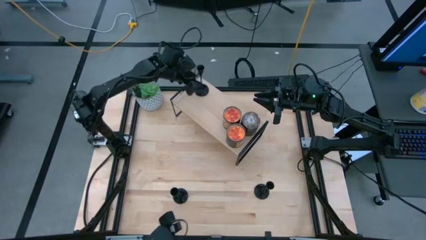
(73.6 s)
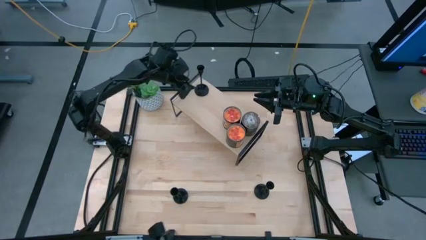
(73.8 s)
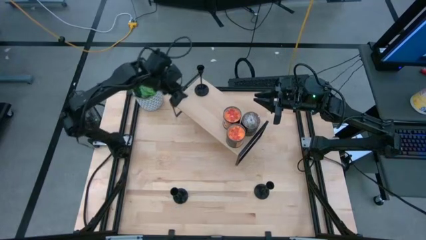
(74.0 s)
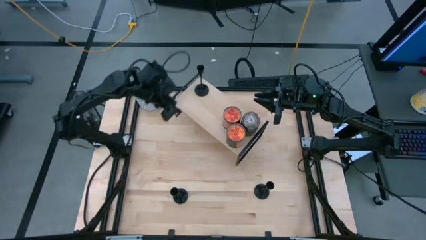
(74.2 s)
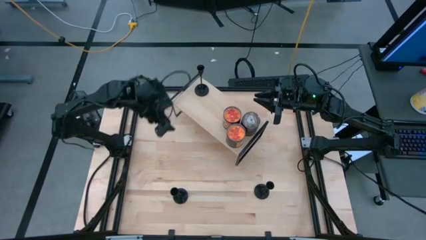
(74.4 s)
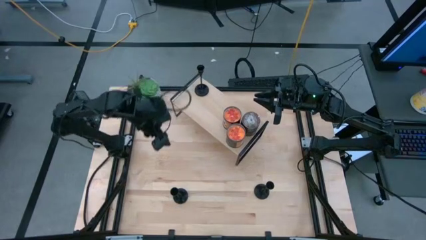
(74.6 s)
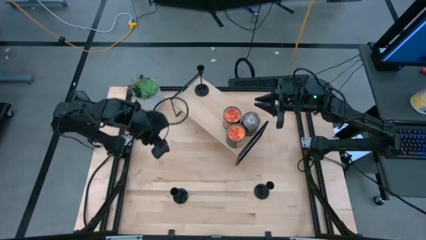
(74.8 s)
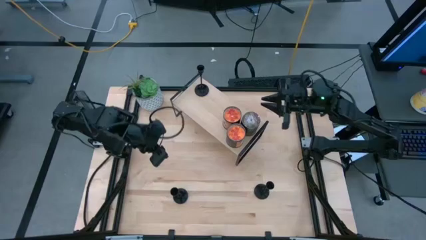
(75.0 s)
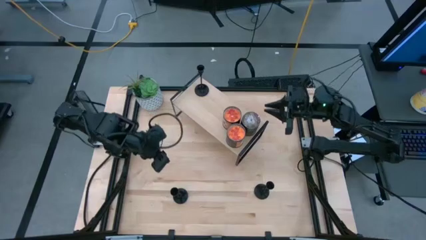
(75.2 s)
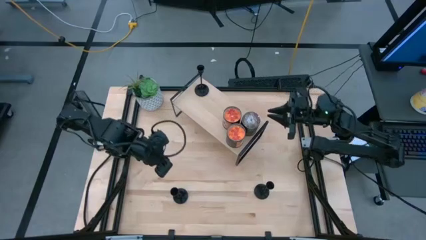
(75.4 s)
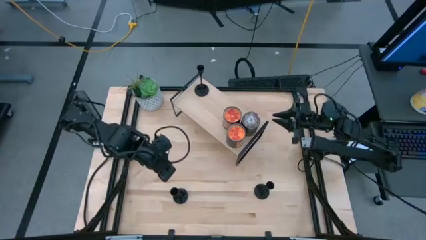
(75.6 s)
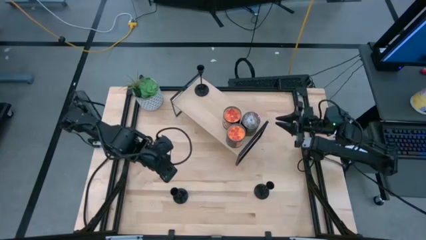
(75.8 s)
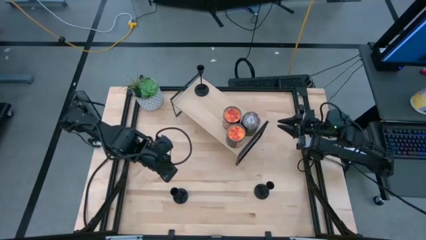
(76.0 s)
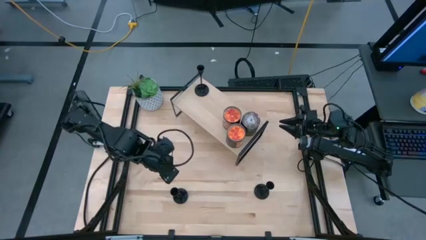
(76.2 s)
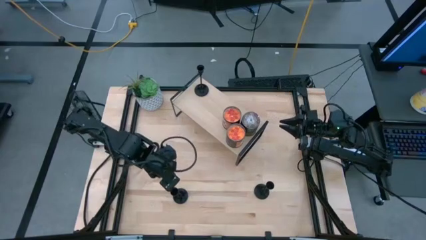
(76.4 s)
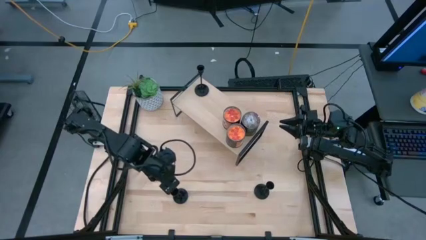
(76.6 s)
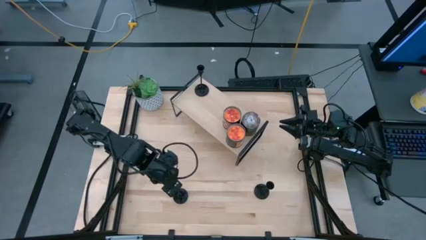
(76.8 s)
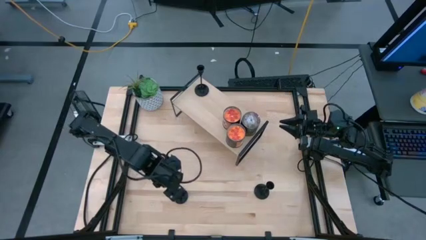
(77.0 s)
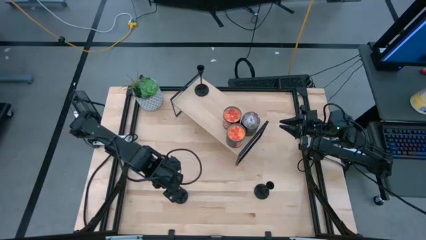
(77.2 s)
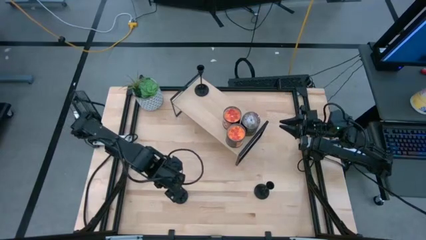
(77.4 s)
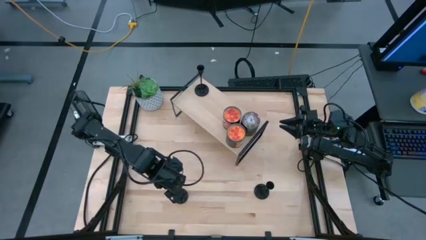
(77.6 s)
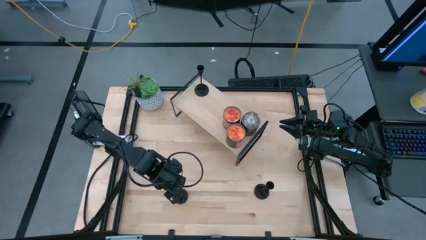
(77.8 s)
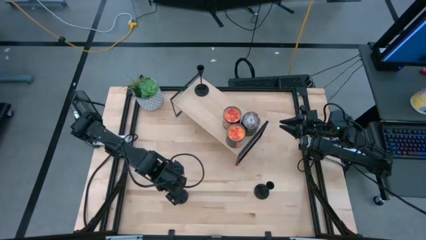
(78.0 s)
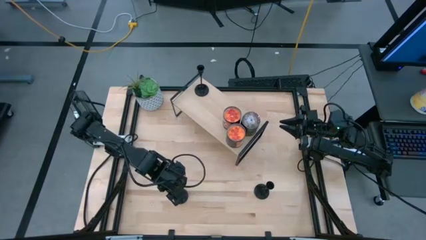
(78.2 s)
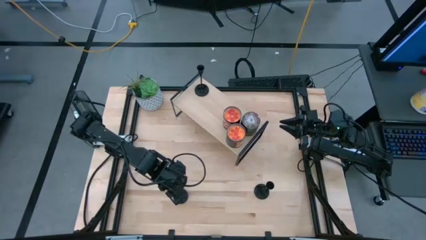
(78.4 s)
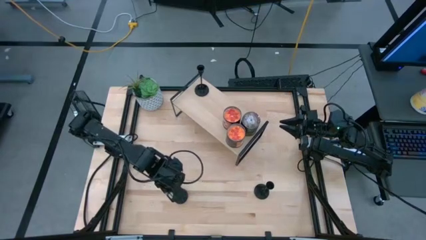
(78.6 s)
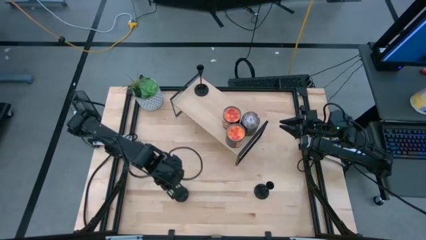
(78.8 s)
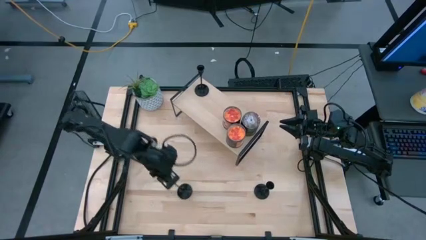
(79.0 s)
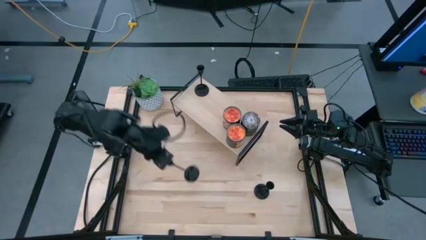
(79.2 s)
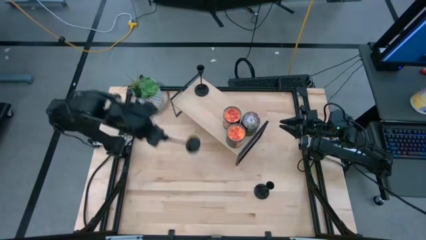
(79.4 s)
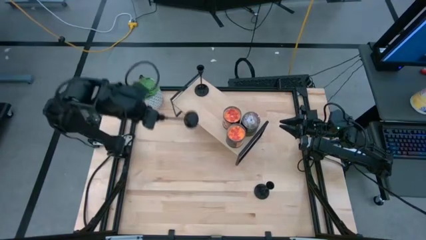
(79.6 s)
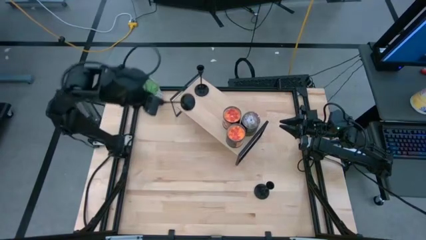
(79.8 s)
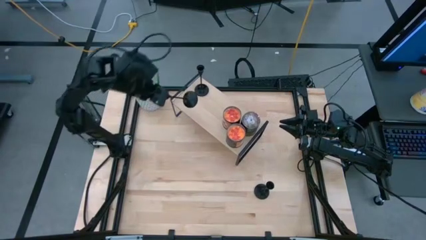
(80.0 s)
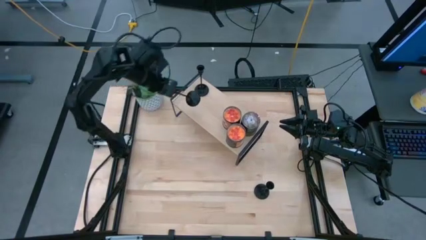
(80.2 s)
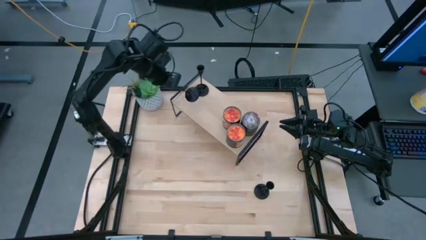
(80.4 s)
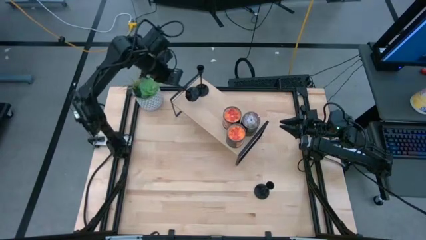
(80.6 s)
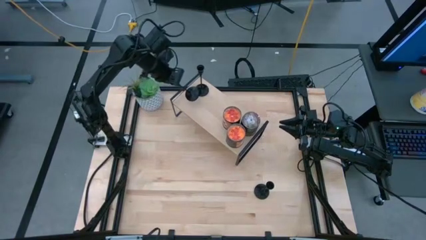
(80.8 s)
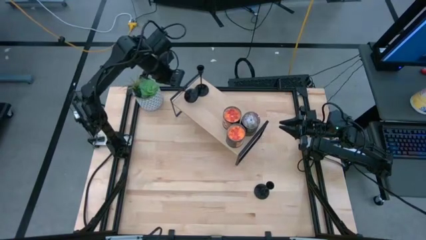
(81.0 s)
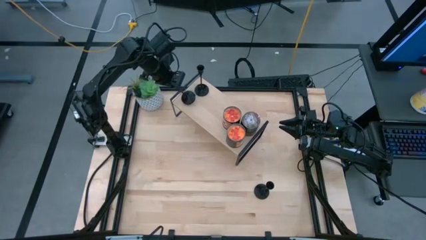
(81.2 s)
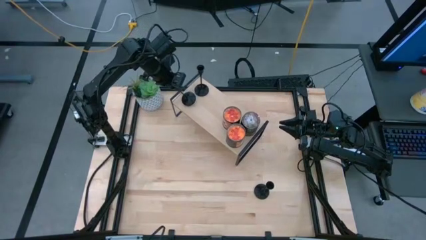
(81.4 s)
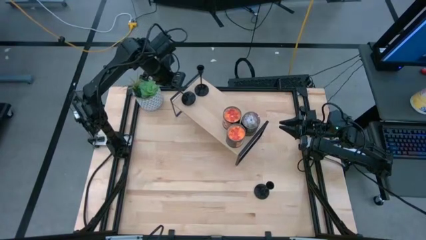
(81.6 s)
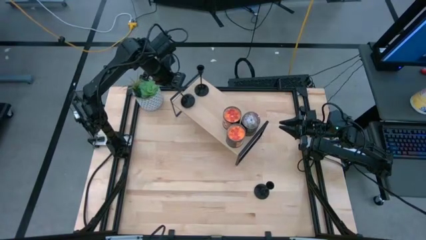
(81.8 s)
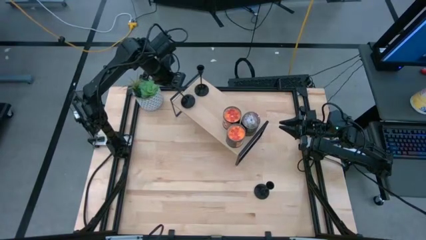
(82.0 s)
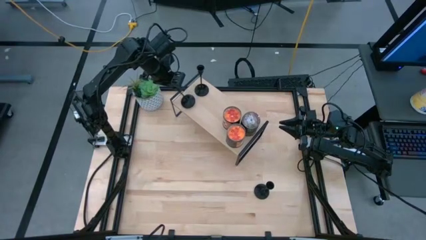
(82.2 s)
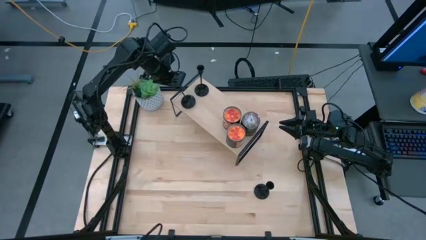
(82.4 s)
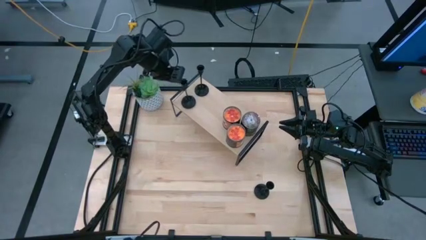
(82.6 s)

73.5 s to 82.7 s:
Task: Pick & Place candle stick holders
Put the left black candle holder on the shelf

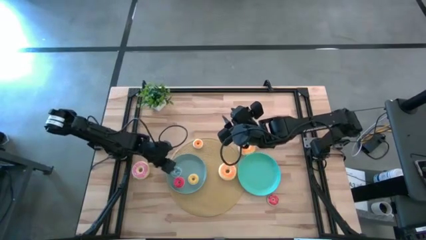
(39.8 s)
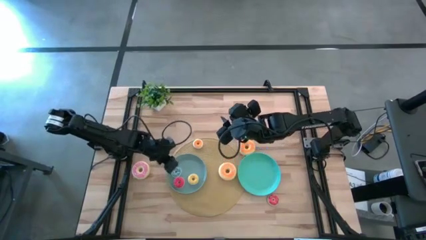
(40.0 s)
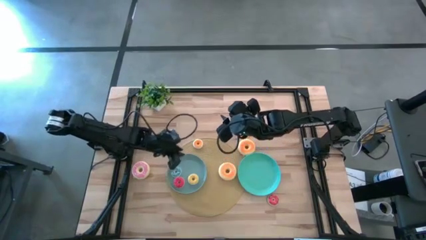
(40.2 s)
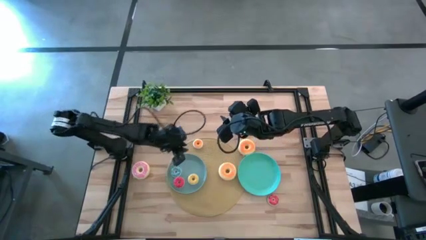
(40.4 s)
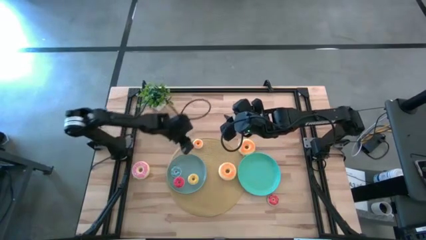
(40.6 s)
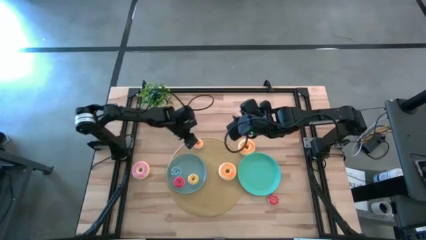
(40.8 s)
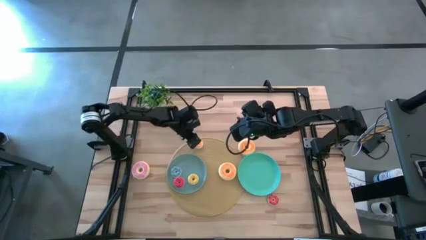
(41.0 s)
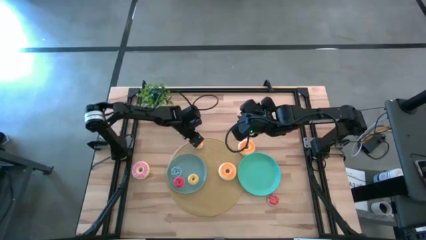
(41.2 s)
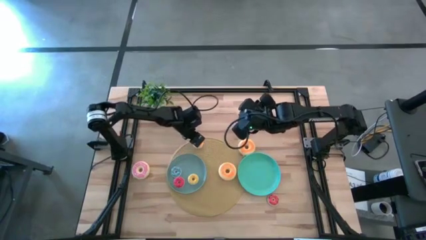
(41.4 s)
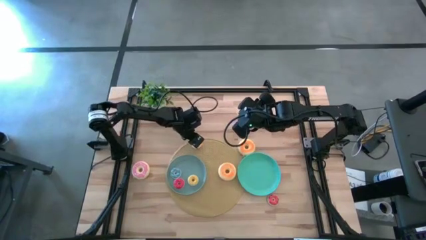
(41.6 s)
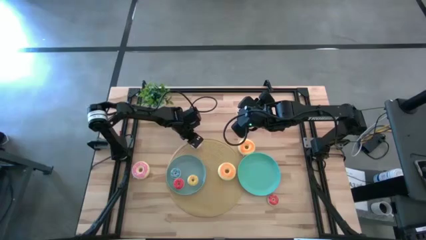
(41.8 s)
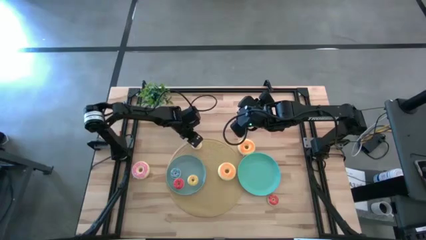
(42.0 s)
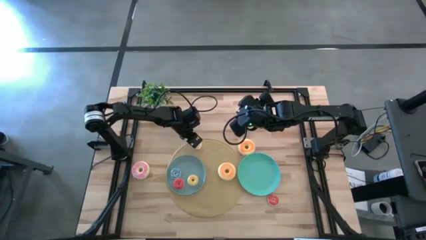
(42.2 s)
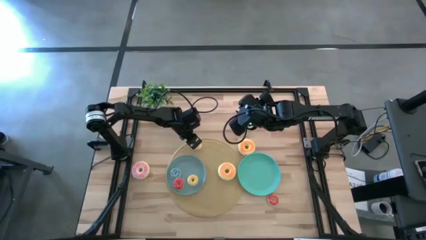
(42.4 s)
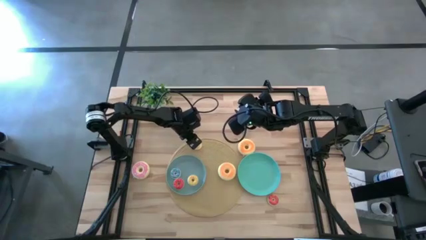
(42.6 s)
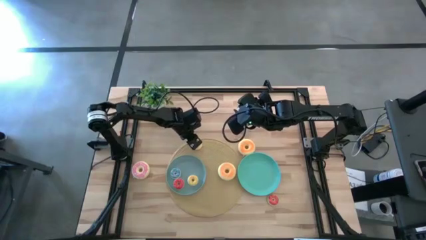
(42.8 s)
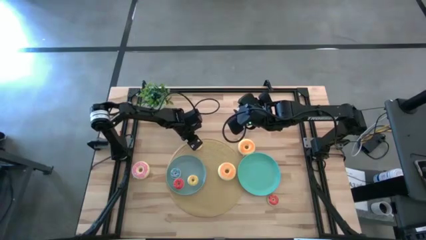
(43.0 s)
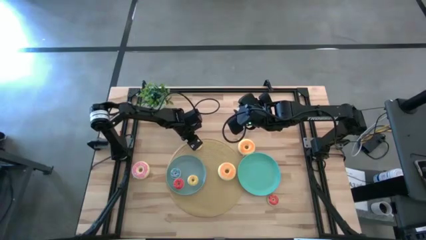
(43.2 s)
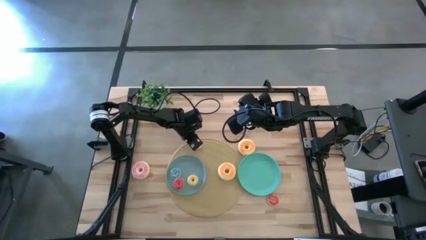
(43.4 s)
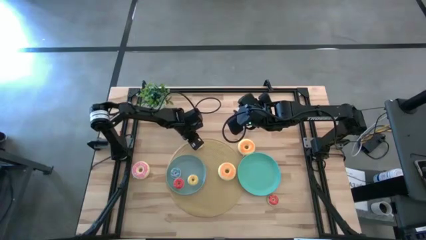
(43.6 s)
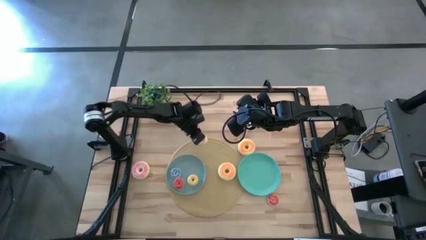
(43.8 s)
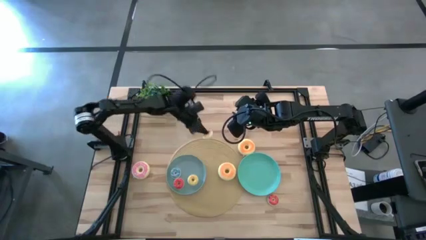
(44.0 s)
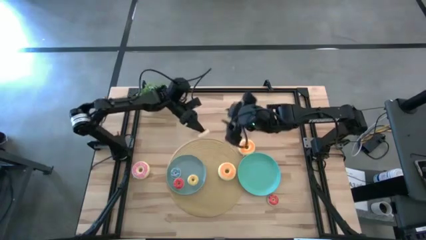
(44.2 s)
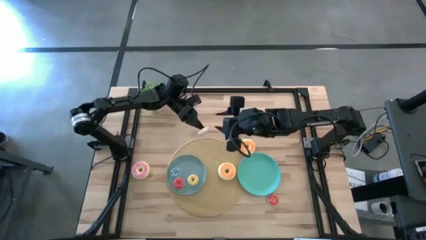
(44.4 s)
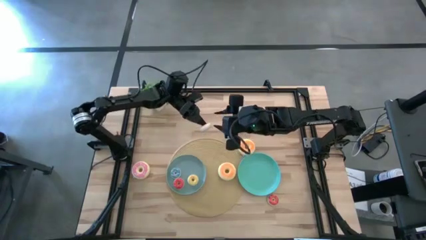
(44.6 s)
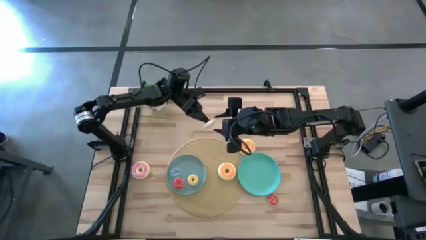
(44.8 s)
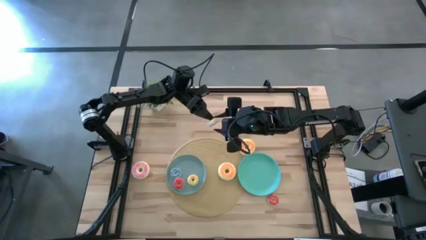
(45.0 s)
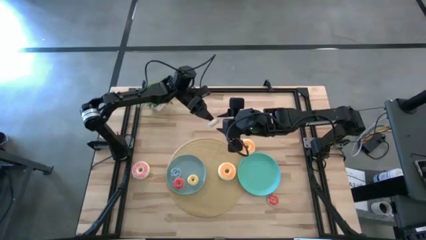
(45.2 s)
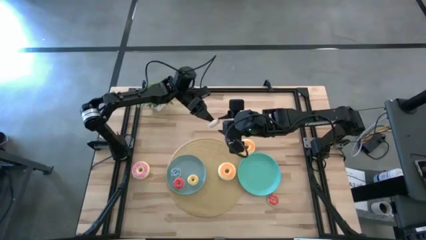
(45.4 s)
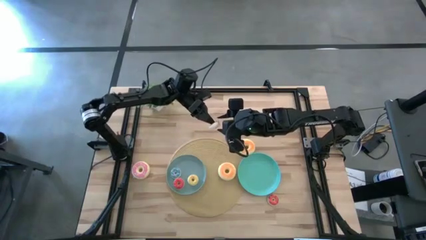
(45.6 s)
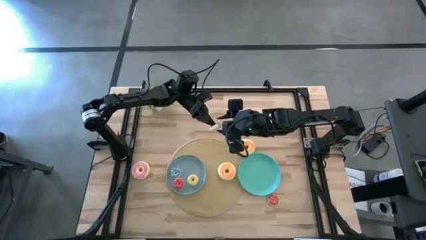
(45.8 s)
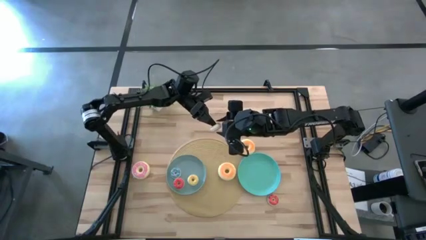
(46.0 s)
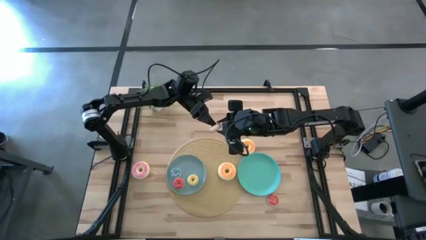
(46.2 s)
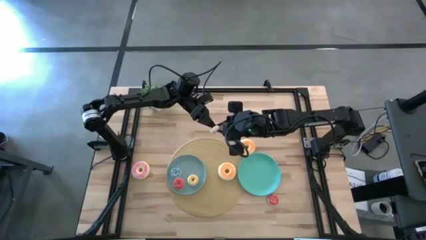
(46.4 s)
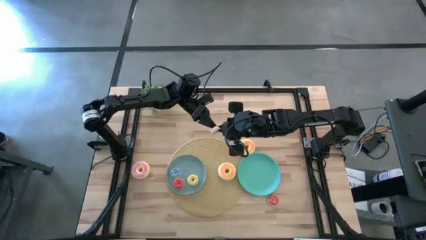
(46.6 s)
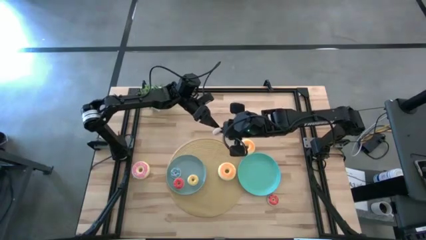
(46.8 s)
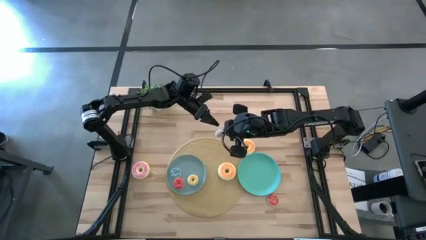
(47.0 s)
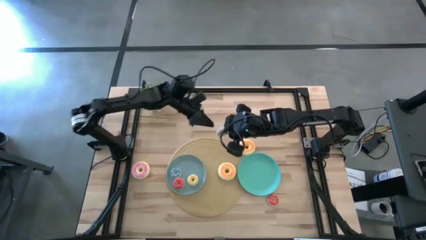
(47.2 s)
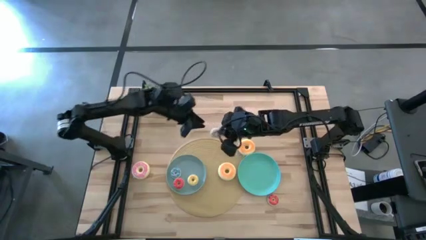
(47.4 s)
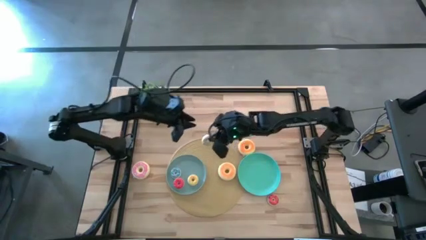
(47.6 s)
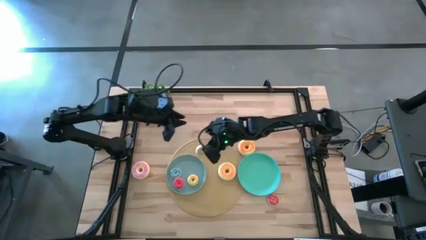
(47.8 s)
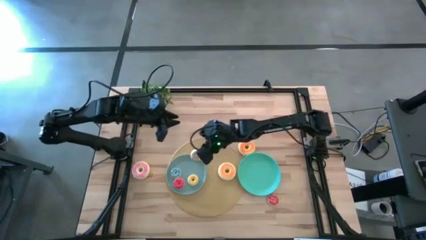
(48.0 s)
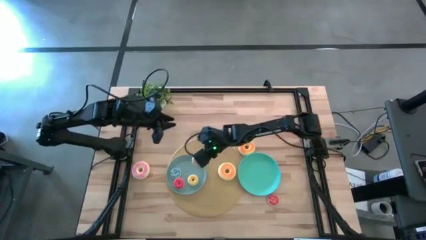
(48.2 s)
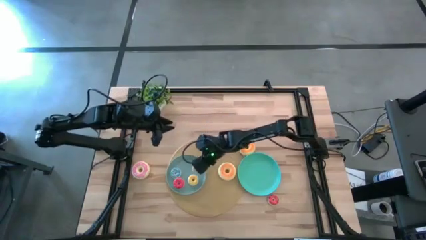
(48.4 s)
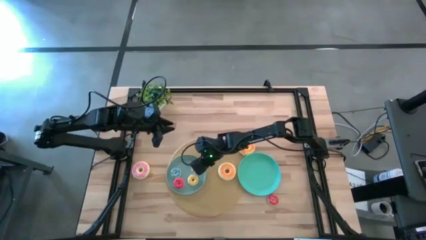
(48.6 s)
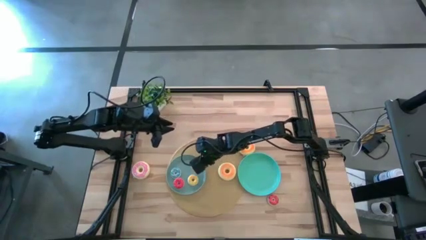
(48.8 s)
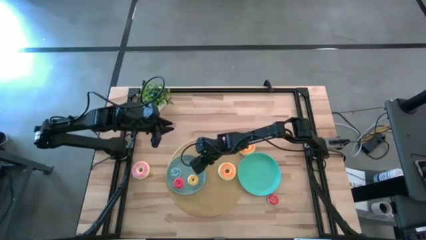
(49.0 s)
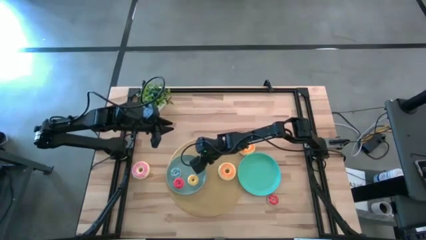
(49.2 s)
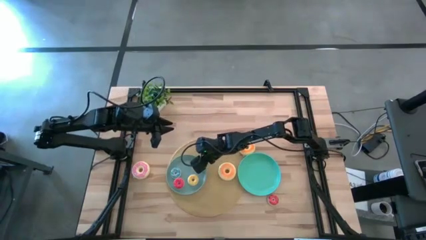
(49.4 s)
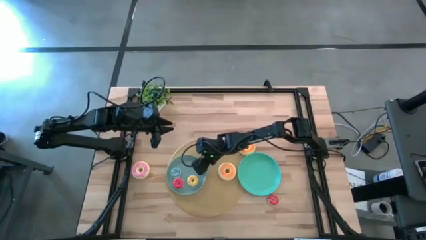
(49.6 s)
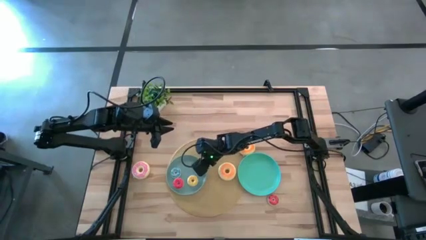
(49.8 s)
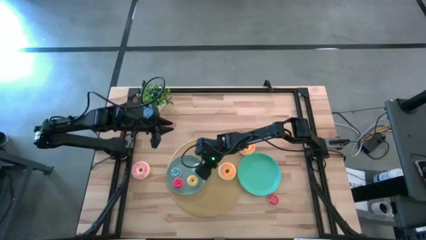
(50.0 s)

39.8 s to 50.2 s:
Task: Pick & Place donuts
Put the small white donut on the blue plate
